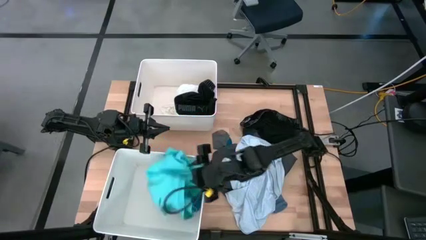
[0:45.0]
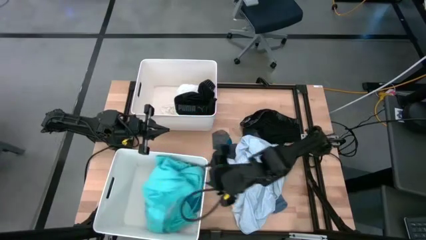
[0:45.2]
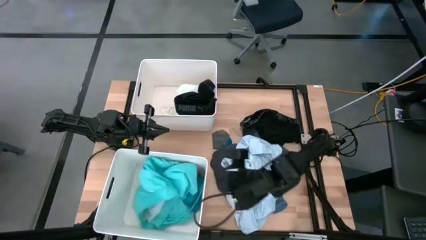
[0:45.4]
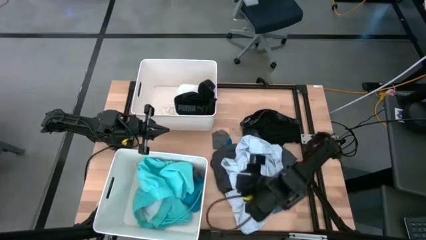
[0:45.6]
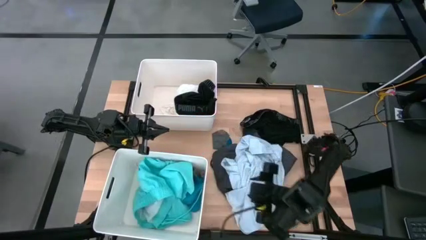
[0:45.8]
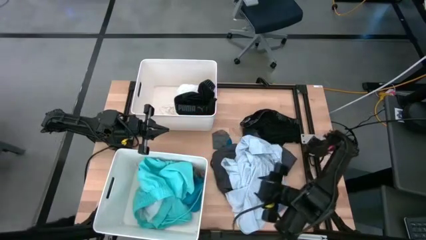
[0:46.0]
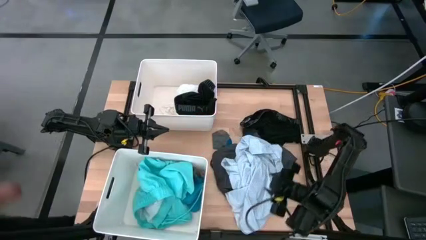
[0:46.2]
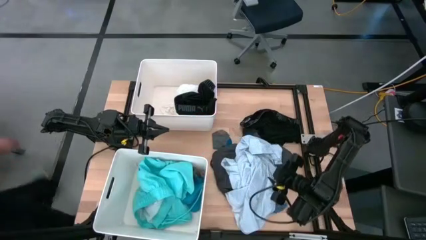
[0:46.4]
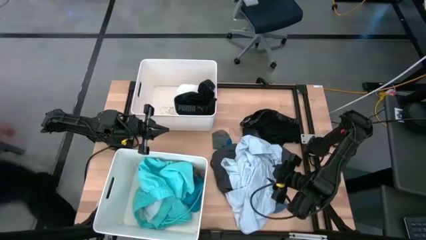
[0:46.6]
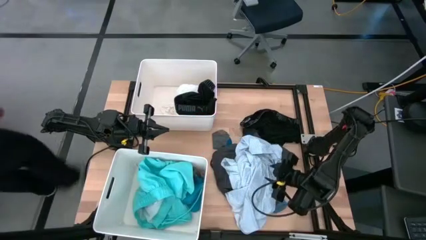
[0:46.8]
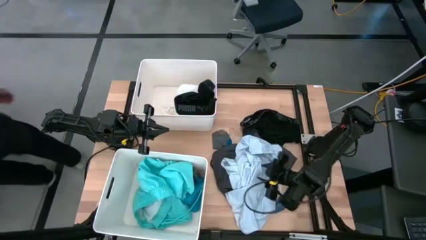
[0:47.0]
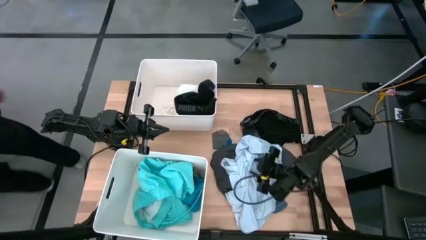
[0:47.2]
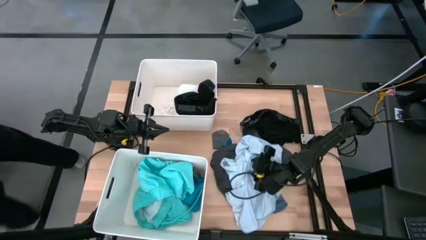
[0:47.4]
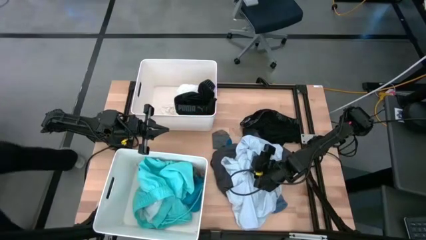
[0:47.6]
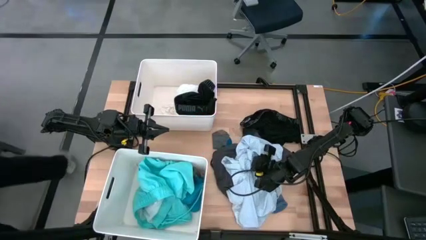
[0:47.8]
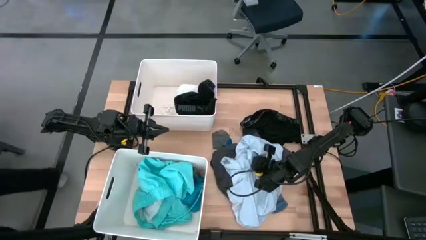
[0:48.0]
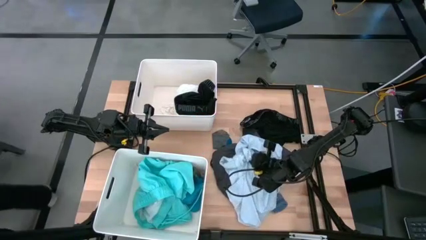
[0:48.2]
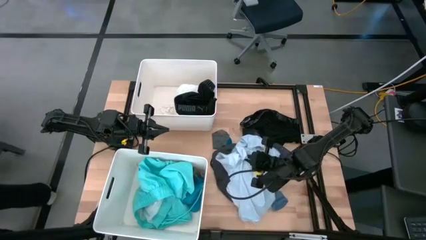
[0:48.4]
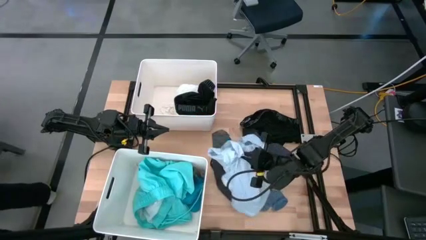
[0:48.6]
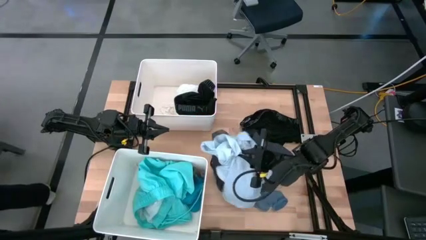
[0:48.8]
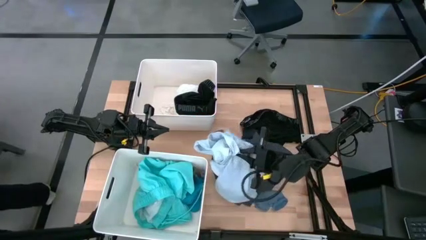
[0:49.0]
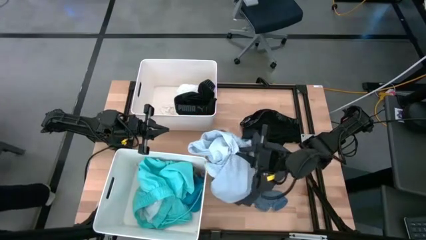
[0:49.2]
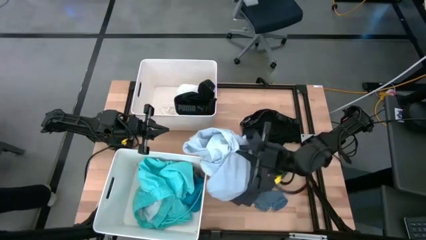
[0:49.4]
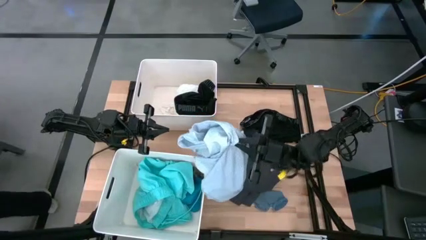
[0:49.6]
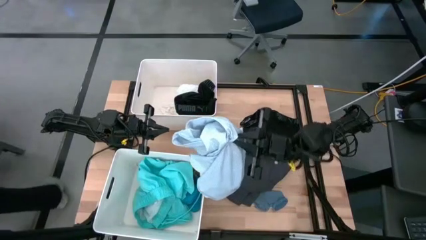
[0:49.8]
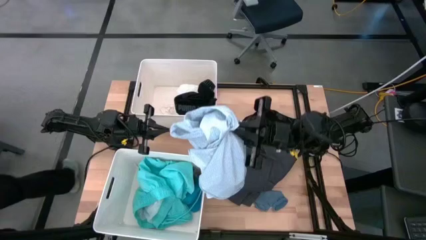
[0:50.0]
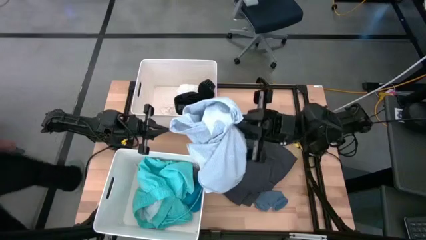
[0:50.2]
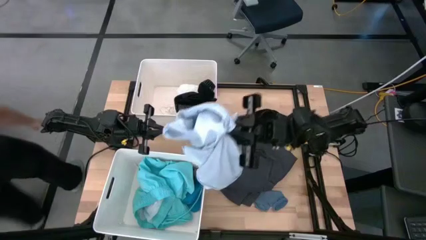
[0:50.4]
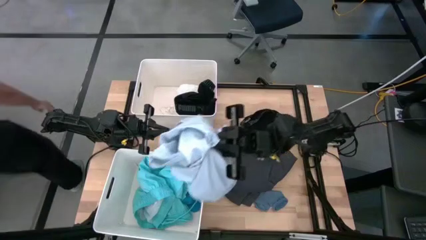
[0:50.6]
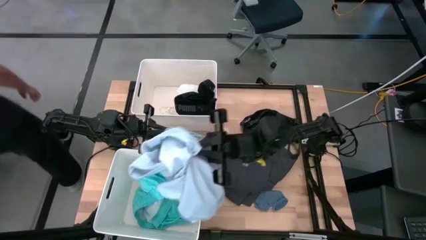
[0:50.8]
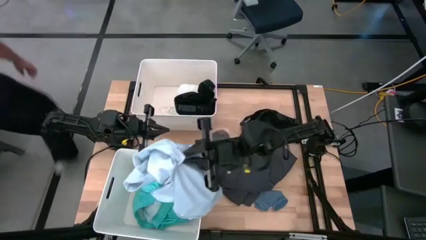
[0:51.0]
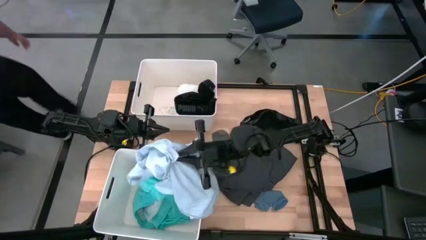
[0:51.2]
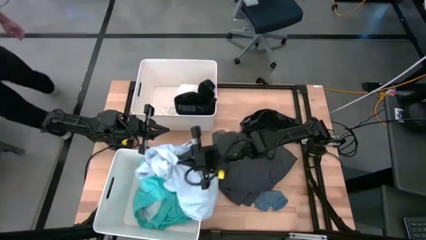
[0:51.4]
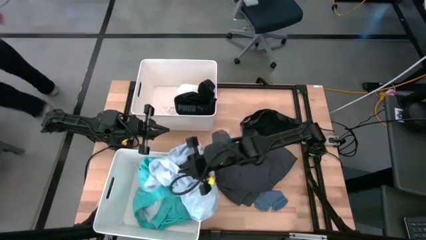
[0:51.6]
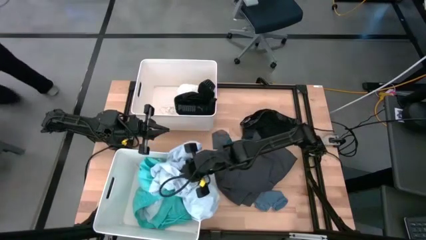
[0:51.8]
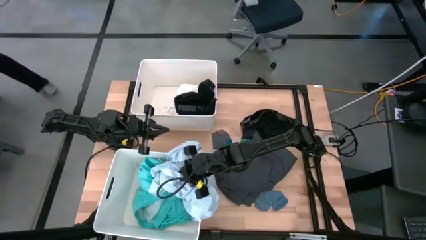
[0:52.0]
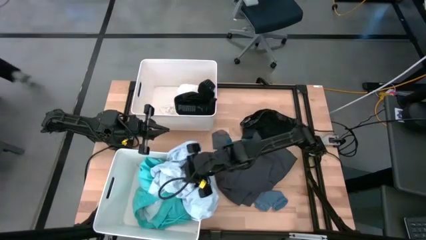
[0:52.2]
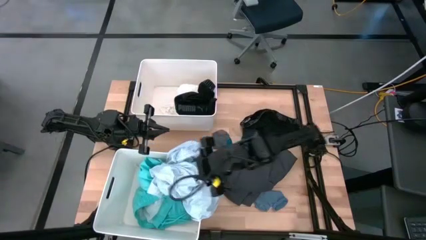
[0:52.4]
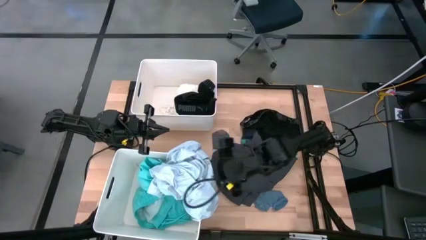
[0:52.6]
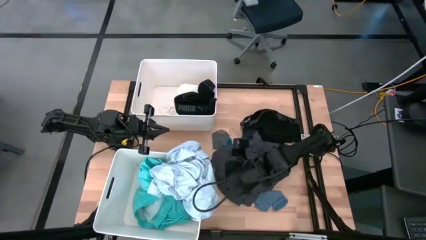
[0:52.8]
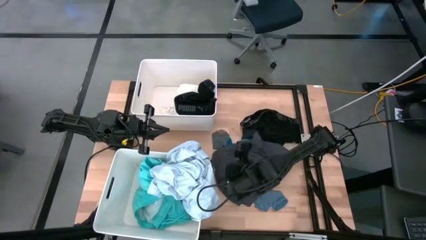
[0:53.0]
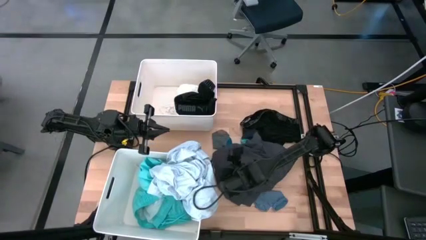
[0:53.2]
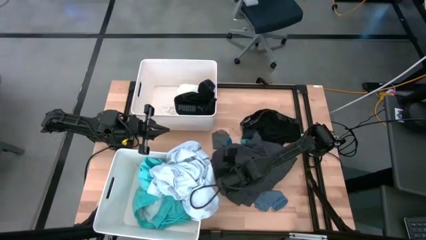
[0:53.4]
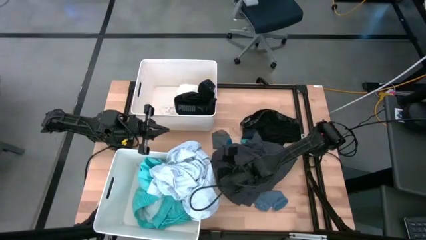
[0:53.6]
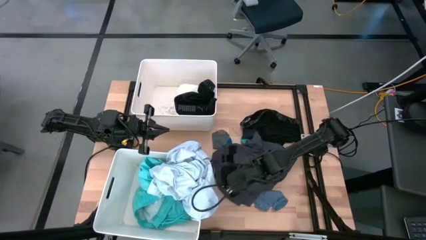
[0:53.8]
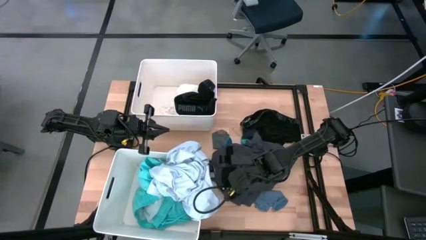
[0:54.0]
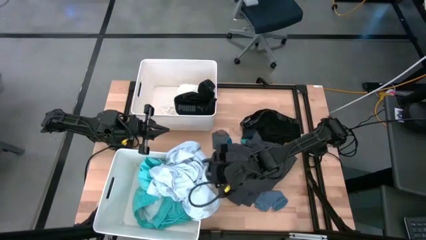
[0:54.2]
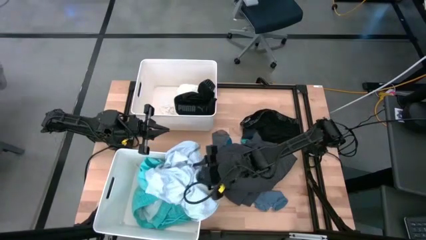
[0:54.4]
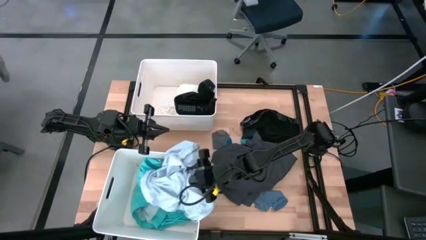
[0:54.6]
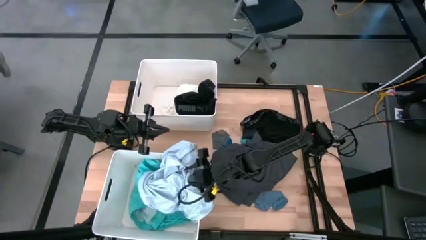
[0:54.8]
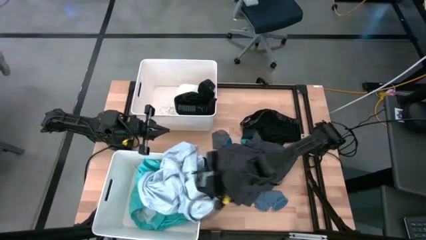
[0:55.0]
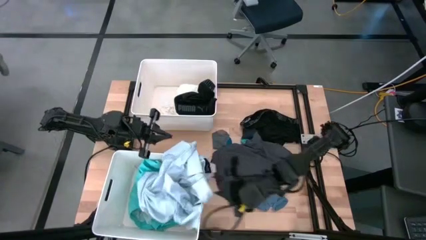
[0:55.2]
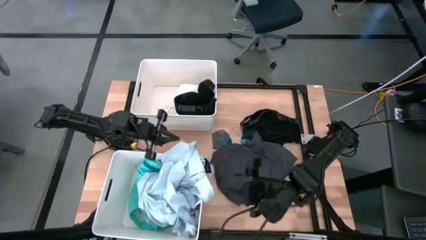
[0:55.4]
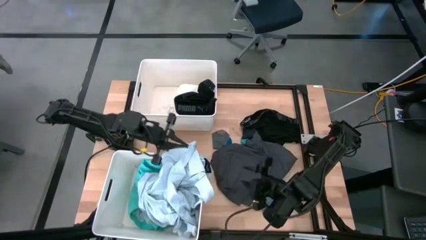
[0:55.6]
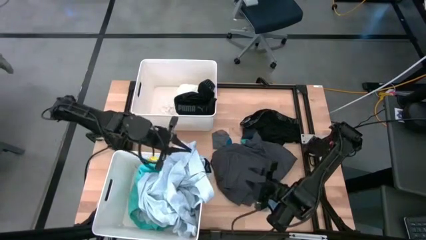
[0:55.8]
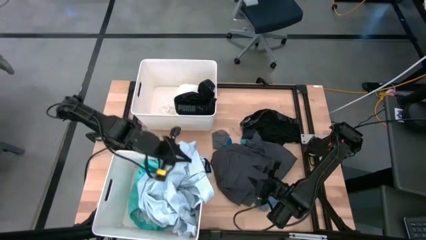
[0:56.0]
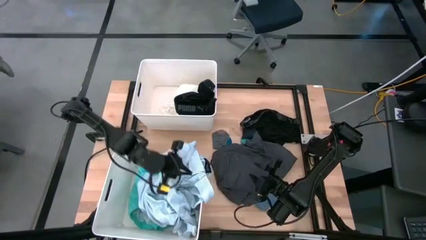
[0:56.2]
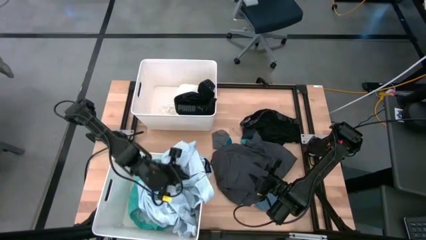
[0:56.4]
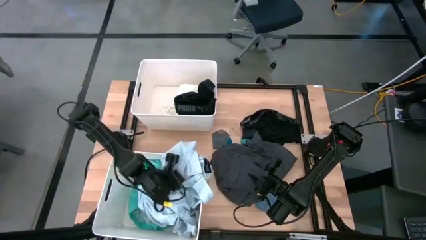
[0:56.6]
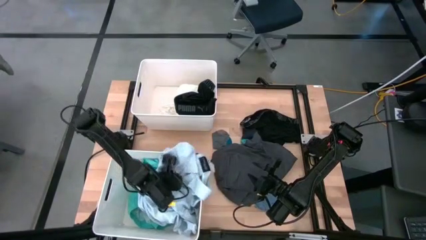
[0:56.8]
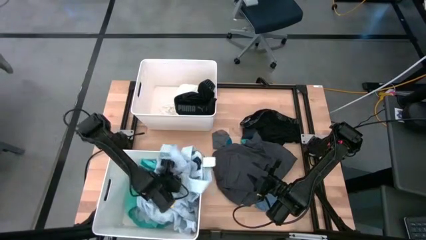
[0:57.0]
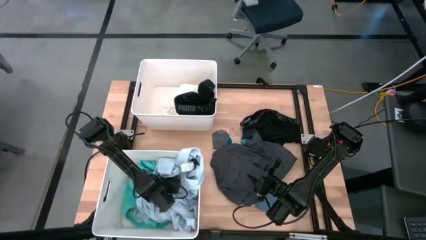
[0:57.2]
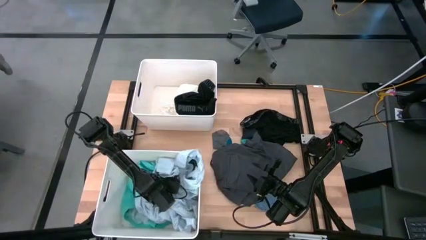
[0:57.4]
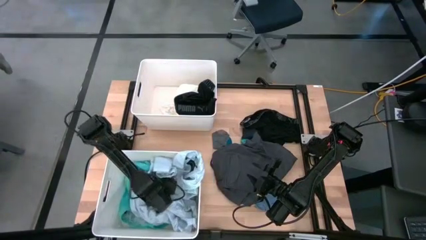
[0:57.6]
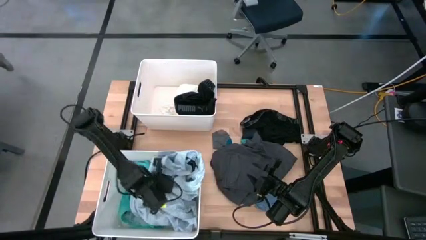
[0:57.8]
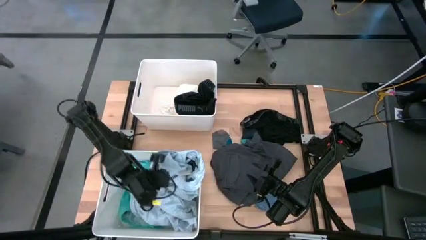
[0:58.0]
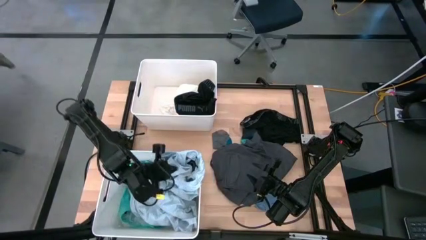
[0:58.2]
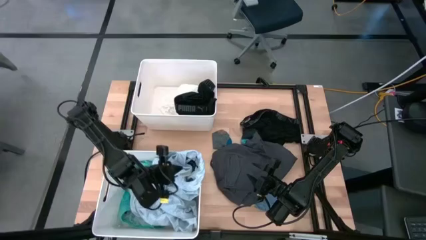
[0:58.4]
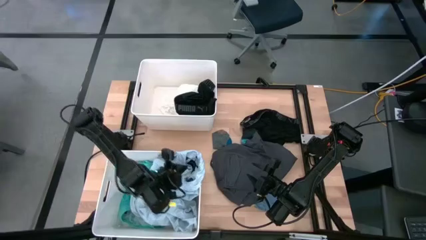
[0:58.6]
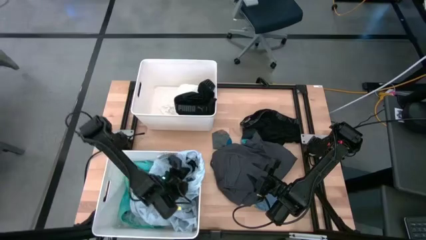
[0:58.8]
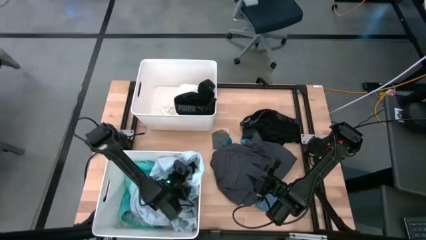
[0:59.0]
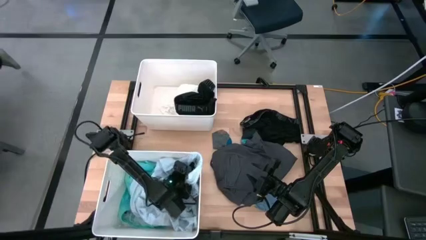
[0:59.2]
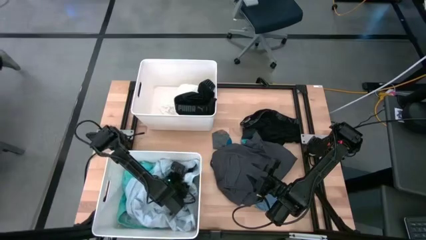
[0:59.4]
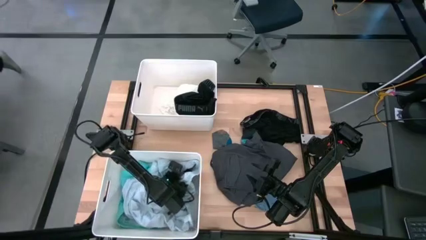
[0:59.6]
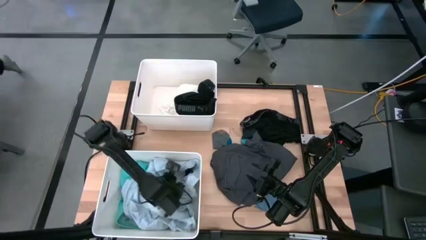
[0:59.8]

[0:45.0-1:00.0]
Task: Sort clothes
Put the blue polo shirt into the bottom laundry organizer

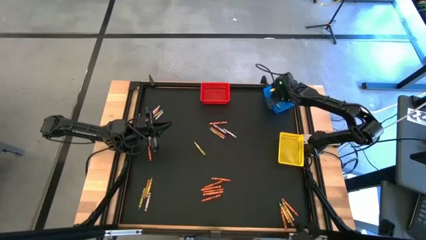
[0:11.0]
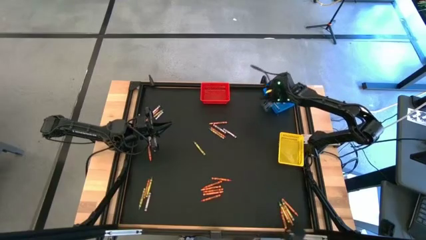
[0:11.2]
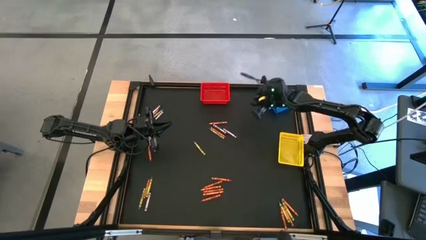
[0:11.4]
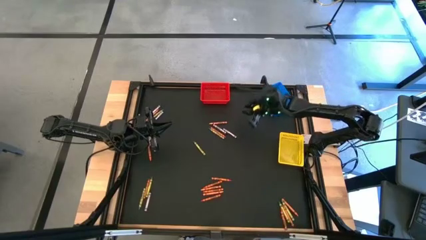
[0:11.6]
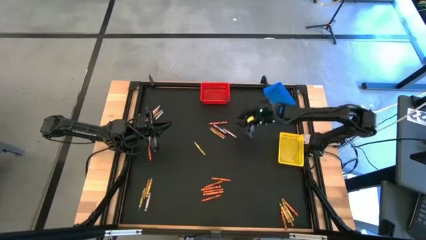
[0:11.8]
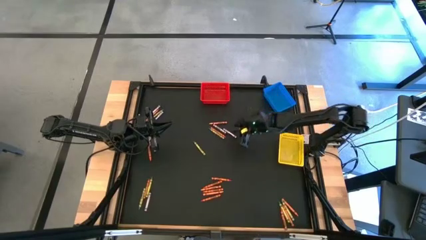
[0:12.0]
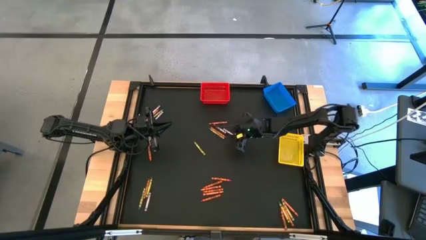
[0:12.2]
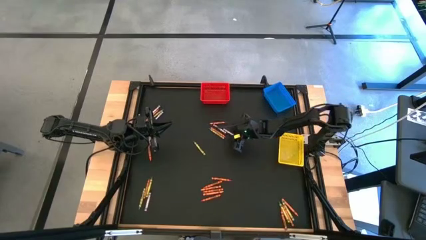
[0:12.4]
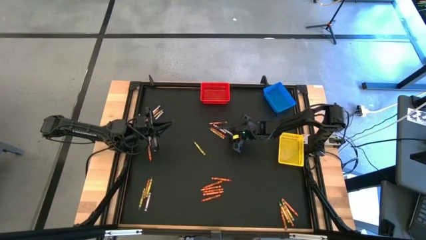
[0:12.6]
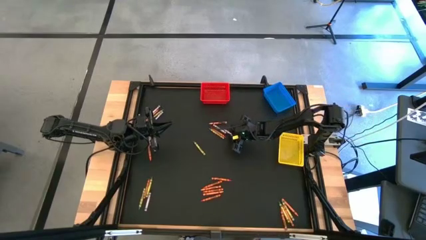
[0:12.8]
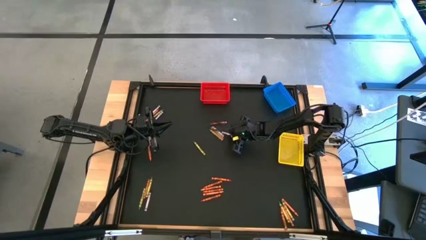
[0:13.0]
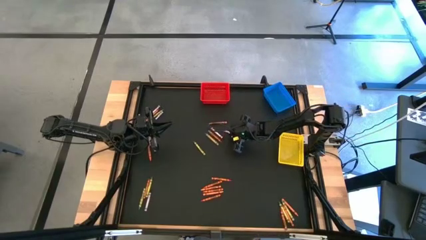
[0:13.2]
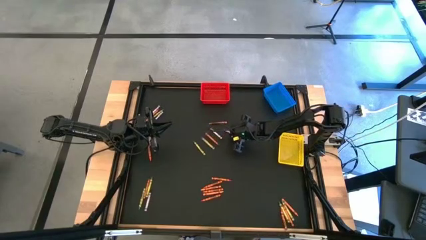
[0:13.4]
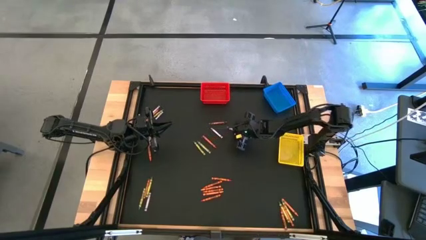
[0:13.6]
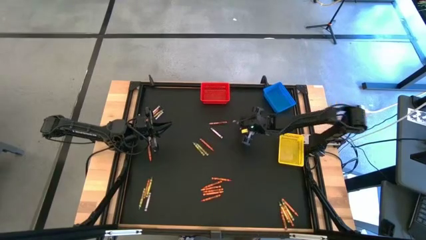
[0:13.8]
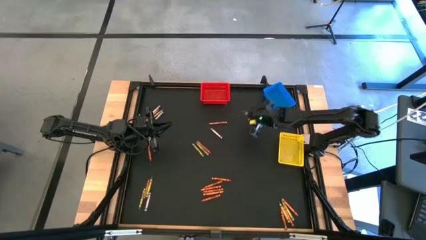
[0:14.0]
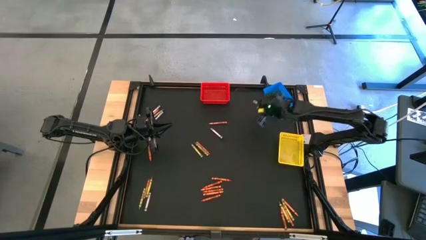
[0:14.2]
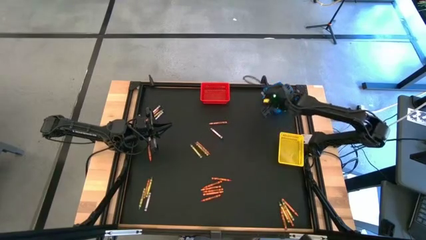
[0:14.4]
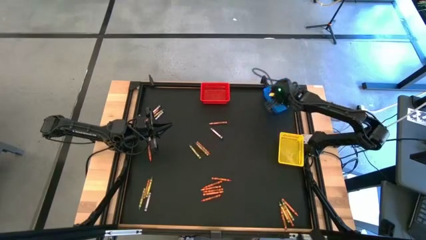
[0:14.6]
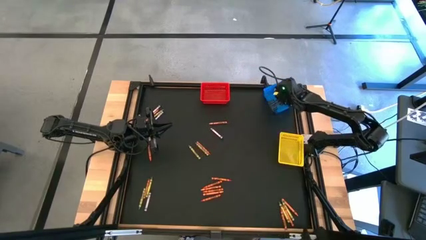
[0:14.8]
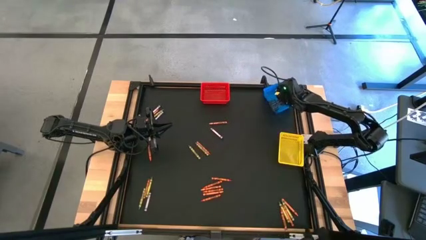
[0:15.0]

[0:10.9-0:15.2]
Task: Sort crayons
Put the black crayon into the blue bin
